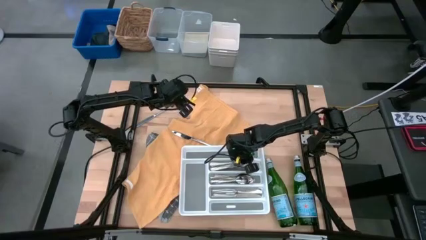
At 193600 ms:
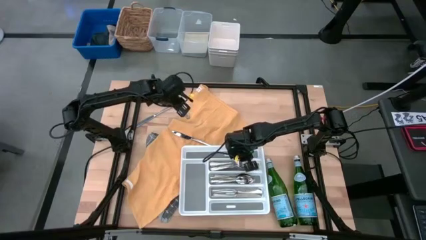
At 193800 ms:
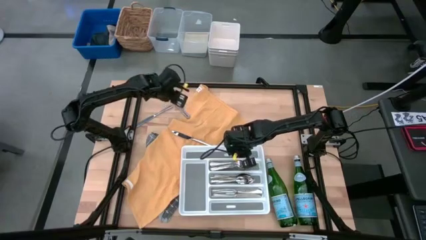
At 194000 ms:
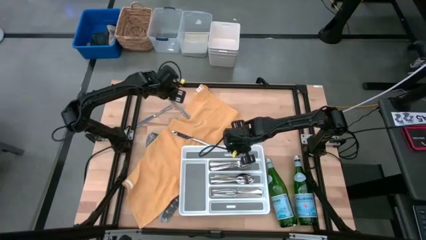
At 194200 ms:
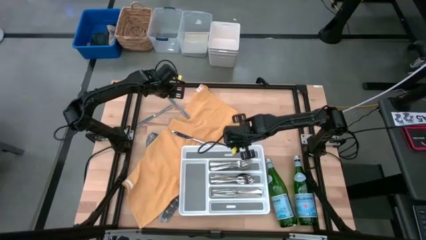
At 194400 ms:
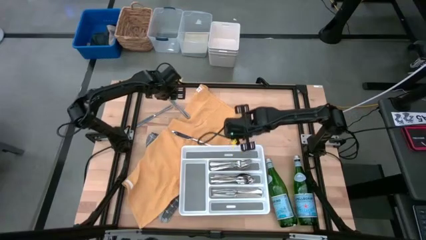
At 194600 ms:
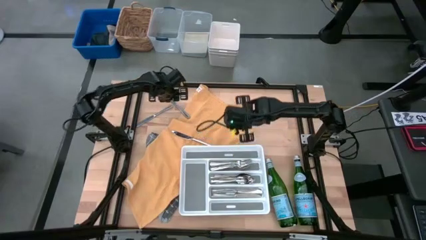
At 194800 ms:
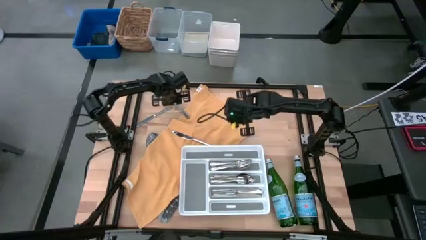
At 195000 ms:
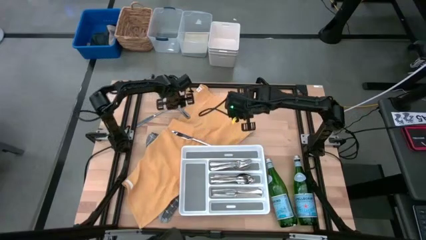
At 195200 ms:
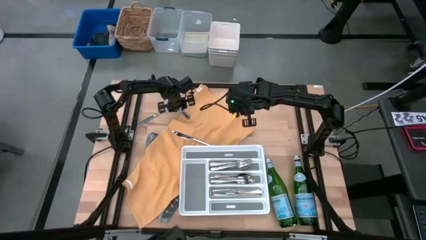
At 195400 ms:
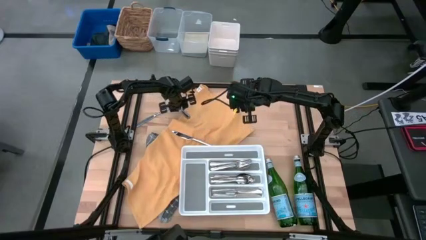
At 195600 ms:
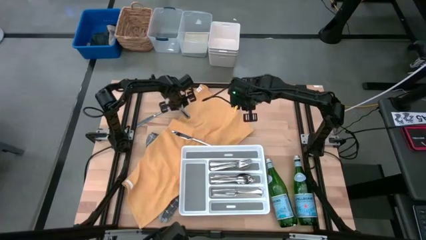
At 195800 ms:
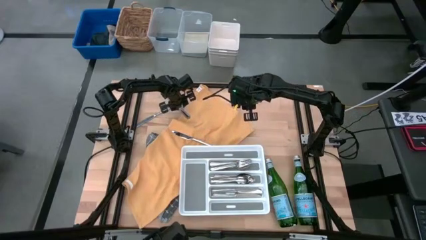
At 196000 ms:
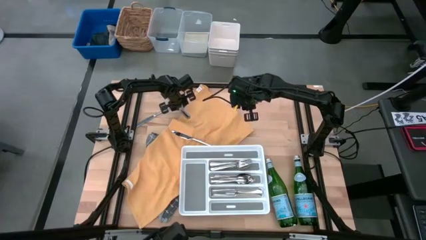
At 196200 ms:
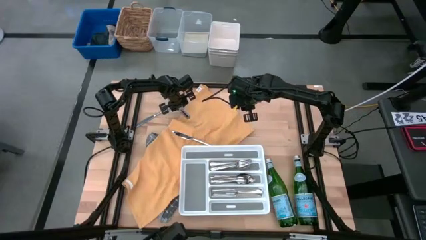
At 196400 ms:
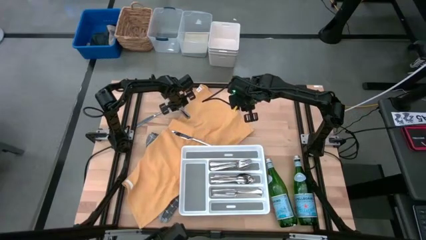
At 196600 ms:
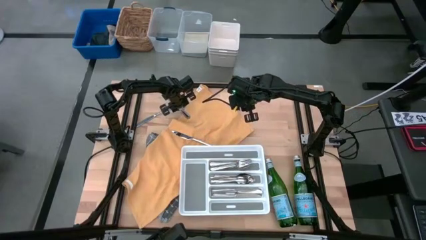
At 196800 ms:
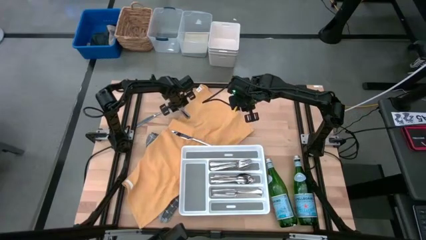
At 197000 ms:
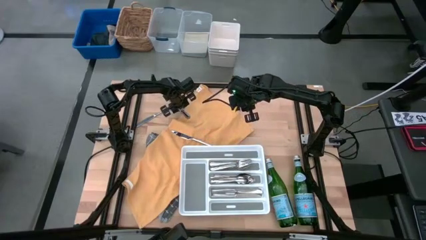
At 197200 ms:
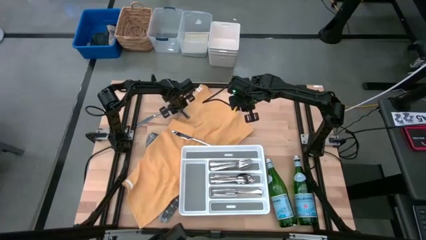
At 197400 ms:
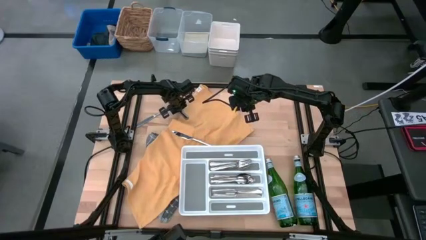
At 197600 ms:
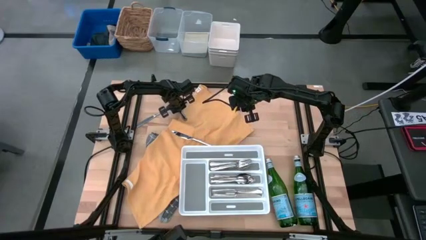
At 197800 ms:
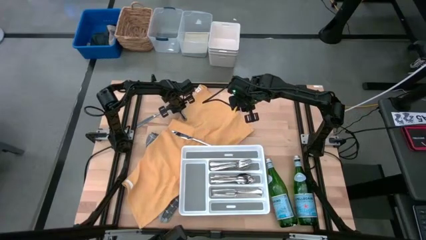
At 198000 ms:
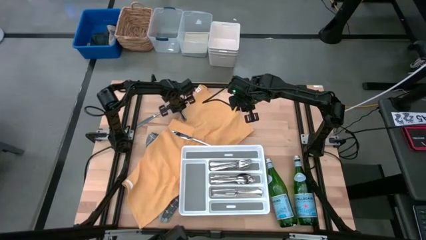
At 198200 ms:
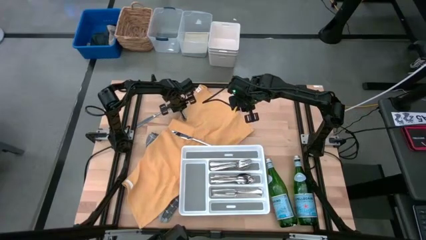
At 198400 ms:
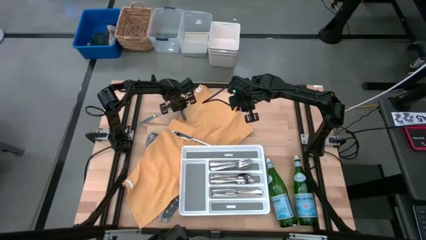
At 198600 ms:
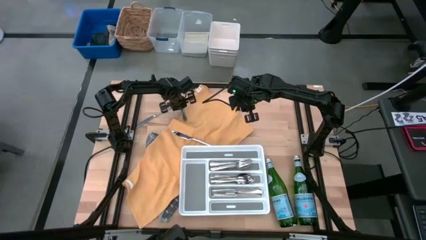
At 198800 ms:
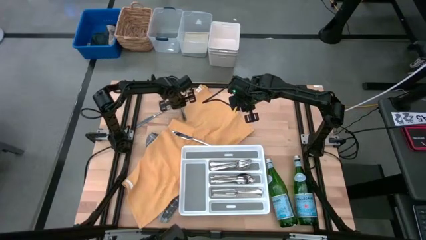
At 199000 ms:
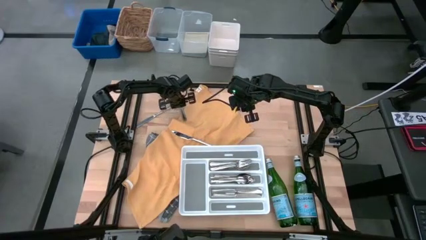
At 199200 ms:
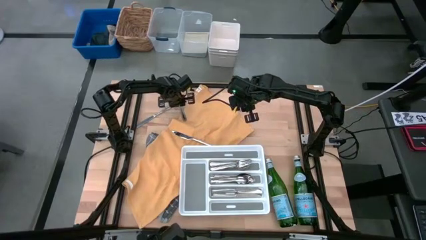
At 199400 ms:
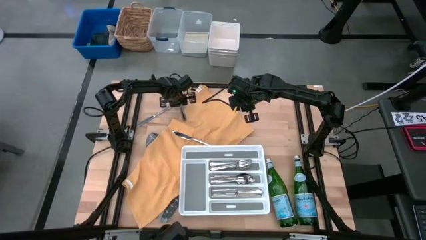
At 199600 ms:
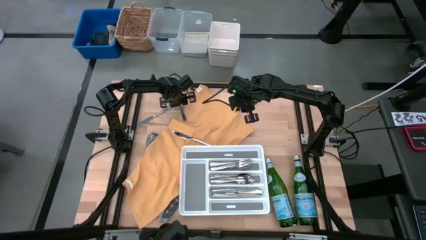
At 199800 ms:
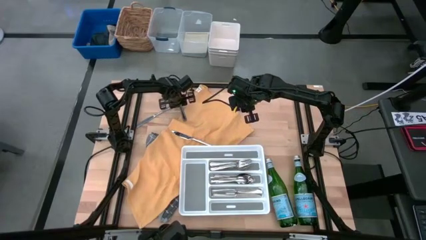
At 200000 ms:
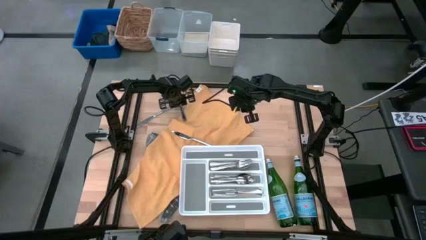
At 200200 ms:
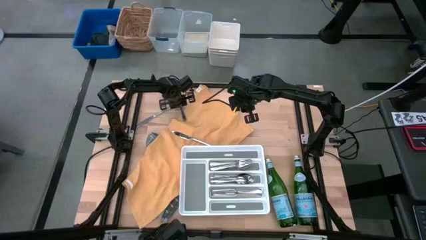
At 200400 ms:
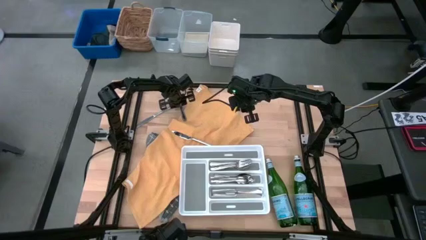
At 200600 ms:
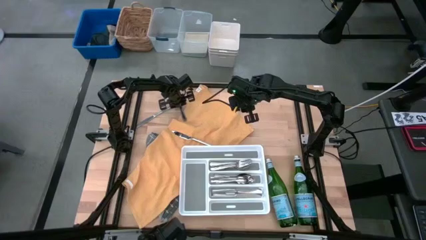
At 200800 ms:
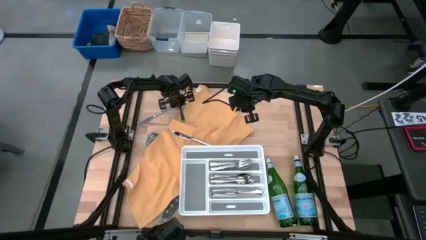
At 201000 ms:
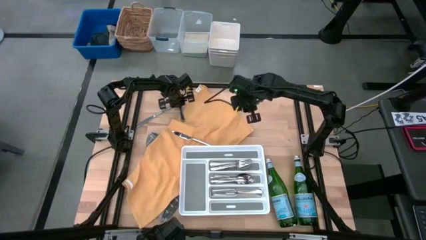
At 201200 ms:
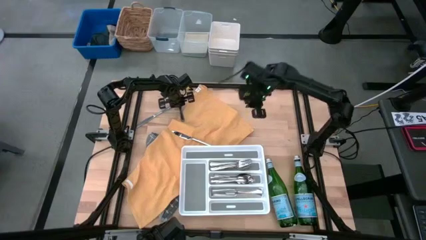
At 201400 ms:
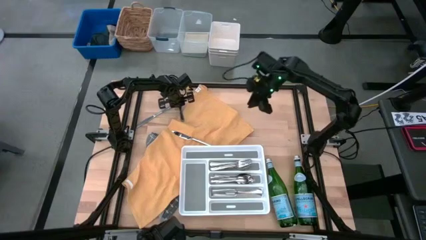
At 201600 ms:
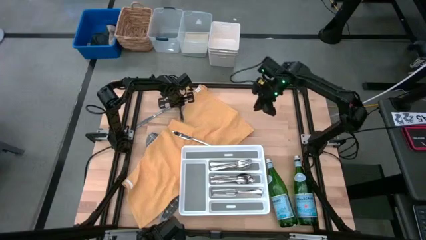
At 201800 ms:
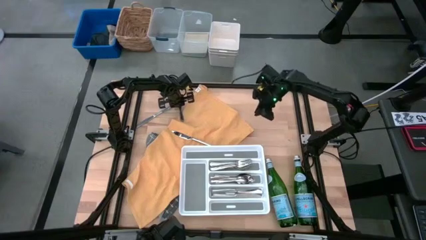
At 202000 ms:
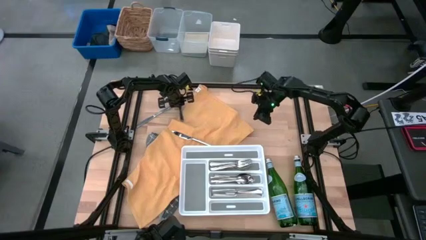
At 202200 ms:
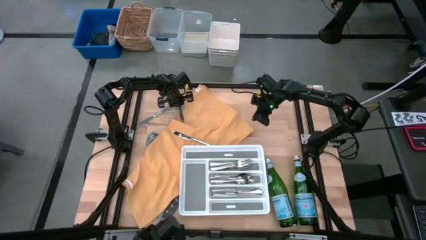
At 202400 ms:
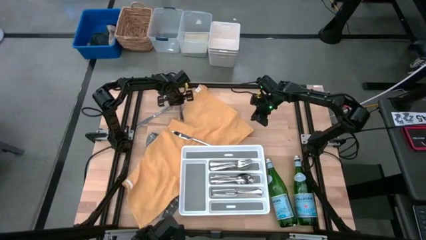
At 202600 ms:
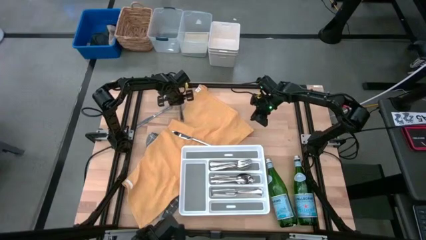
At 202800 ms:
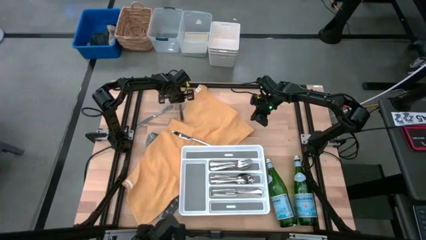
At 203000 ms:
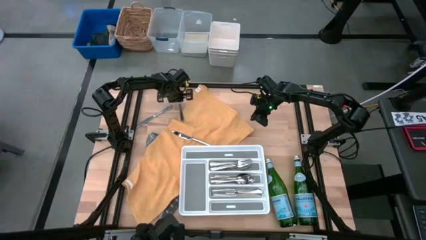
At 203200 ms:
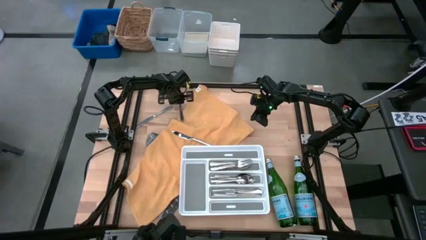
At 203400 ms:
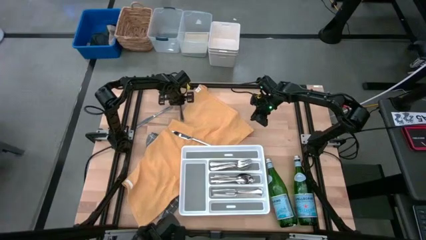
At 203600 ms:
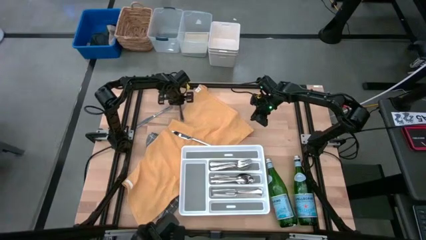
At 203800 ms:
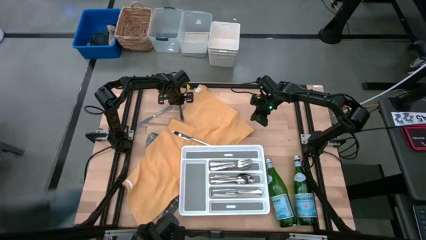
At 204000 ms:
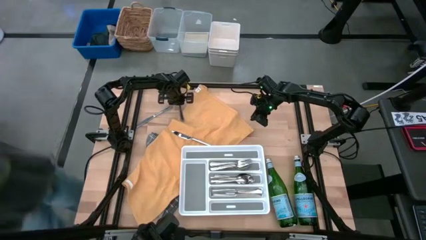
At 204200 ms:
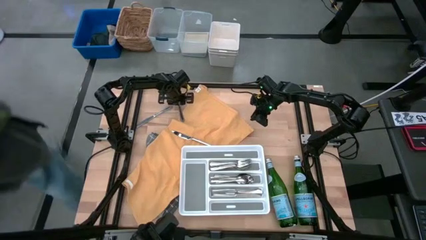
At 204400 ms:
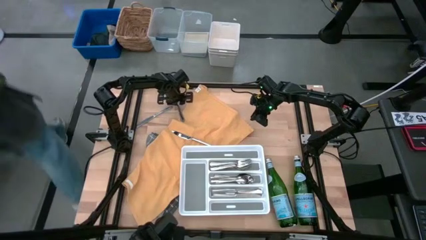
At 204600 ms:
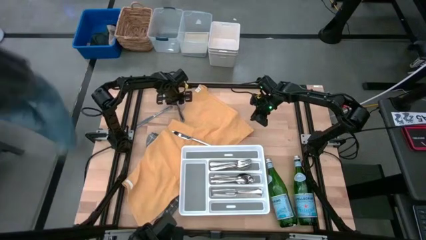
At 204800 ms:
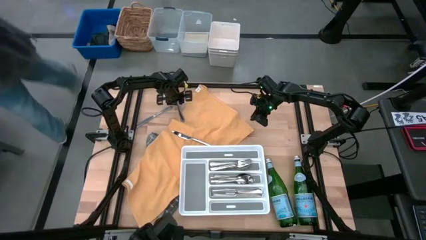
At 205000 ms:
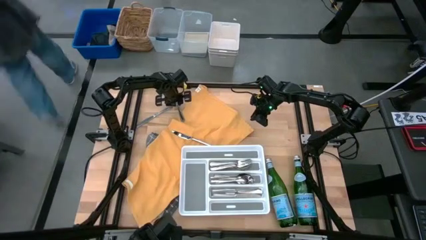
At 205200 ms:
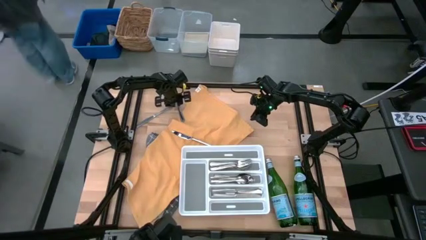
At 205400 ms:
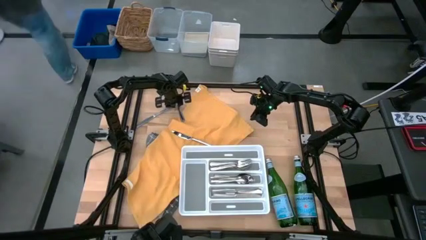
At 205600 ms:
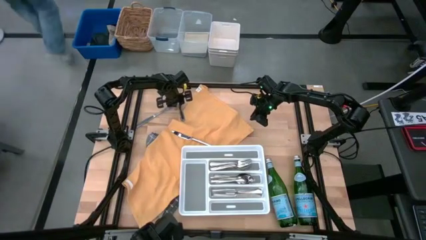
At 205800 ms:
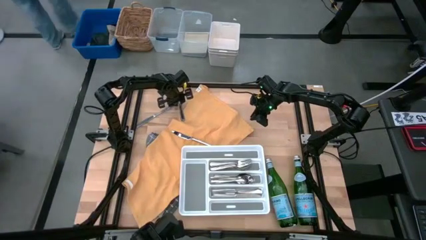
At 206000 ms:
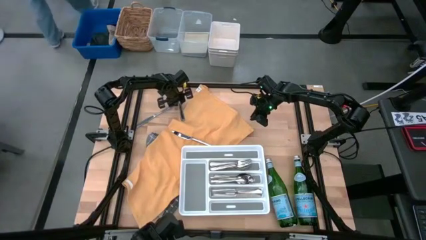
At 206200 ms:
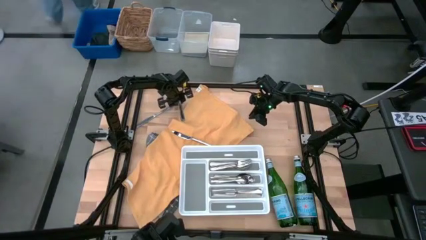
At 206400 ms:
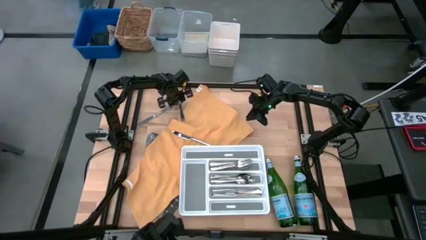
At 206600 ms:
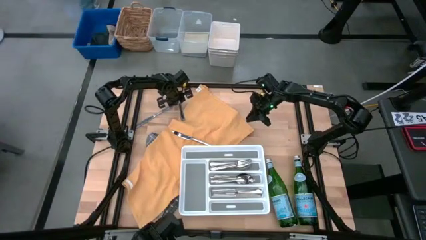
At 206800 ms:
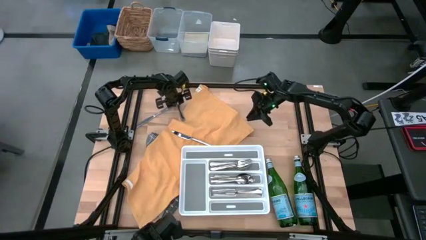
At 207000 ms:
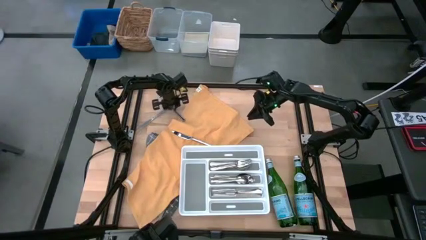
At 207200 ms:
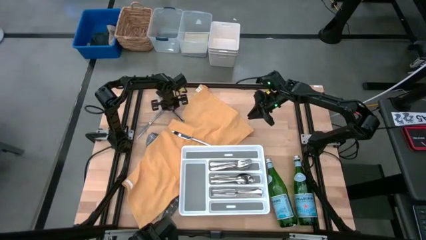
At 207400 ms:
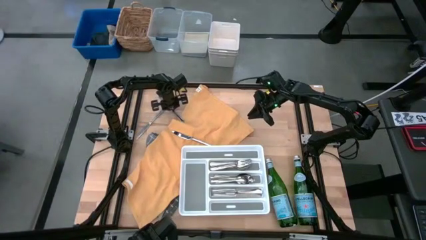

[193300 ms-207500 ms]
Task: Sort silverware
Put the silver table knife into the white silverware tray

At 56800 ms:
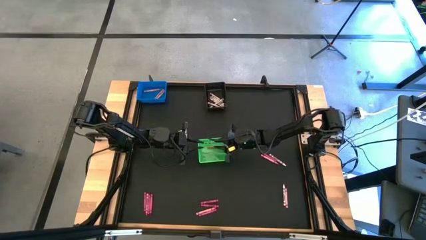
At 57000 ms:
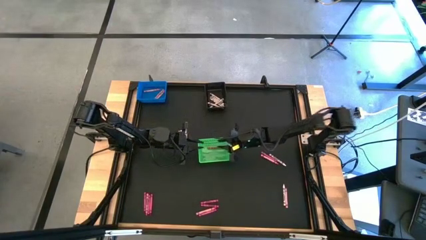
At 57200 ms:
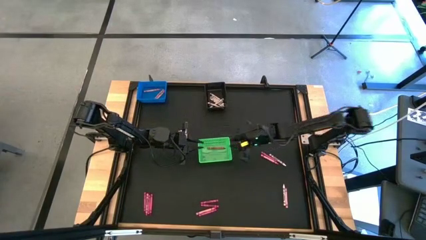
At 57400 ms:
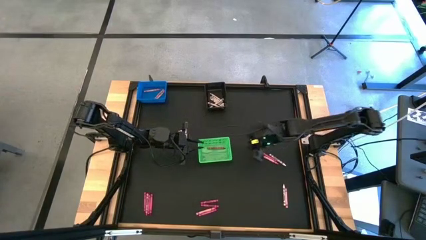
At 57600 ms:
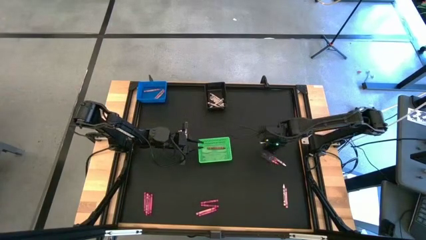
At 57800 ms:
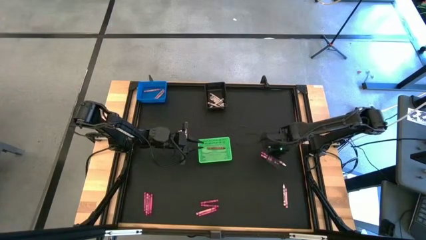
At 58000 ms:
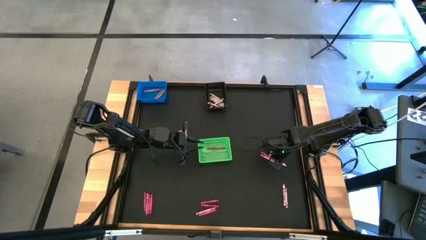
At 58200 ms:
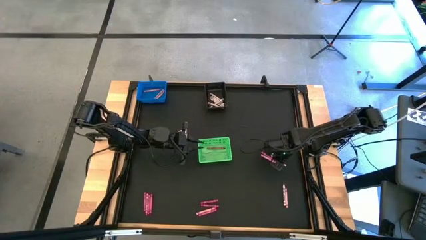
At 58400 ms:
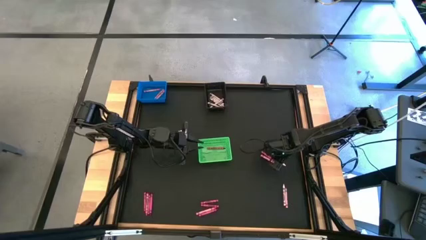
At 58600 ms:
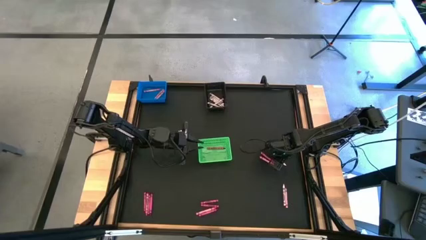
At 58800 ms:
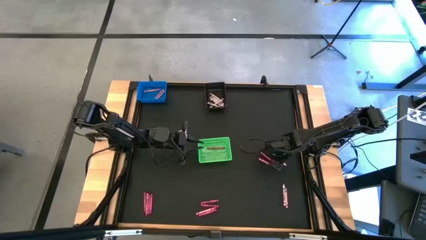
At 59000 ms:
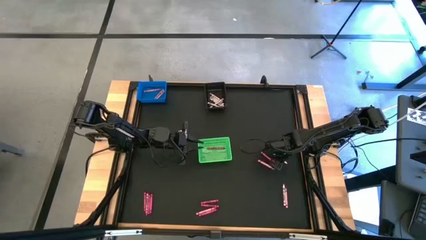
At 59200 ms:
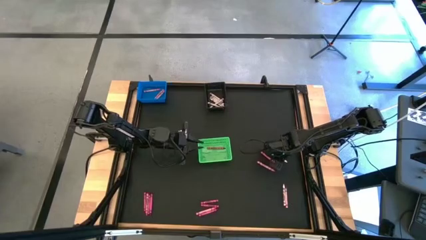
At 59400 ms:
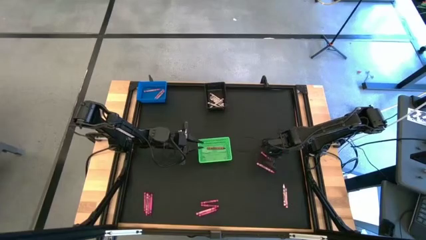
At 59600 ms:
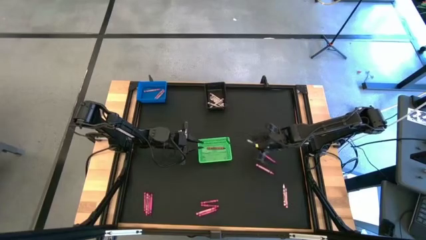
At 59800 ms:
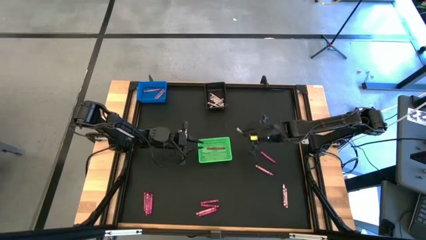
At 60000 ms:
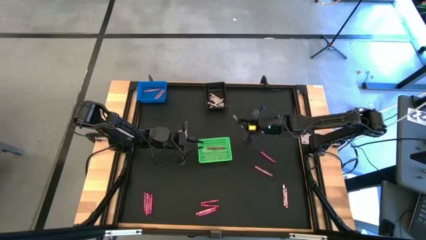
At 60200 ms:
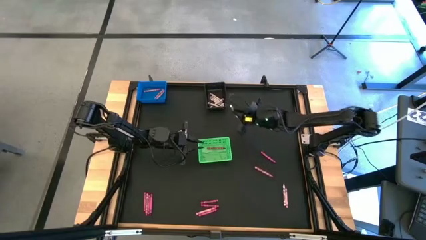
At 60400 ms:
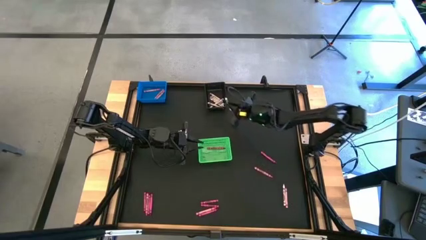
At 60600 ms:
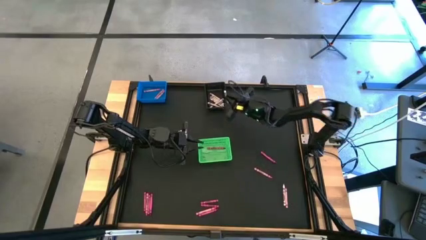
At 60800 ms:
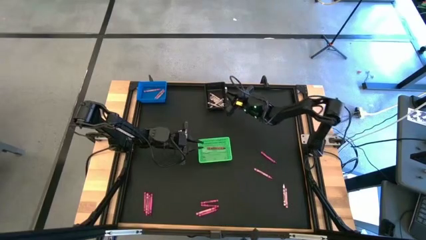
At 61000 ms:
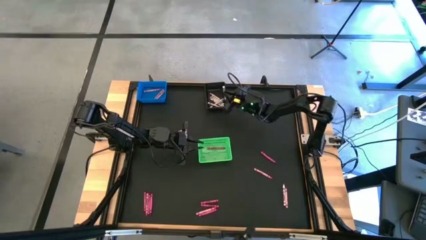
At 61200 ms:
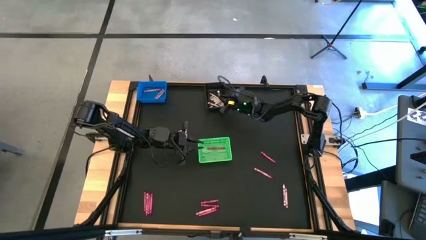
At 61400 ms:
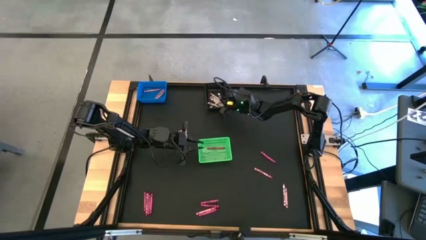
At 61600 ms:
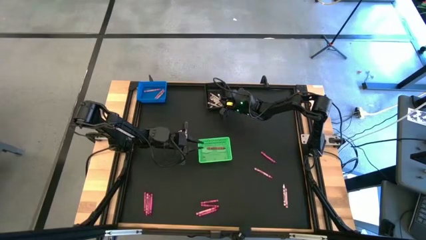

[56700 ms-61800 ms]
Task: Sort crayons
Put the white crayon into the black bin
